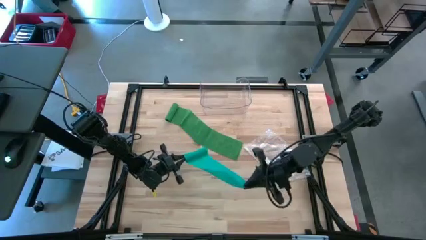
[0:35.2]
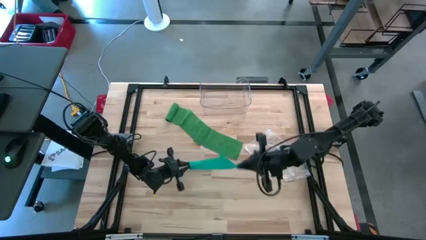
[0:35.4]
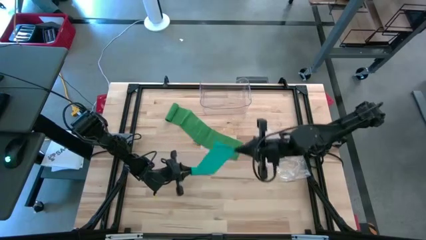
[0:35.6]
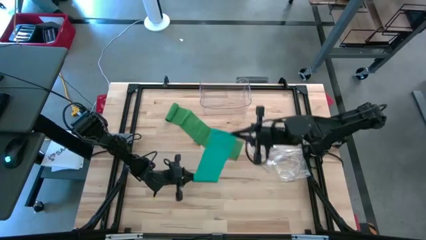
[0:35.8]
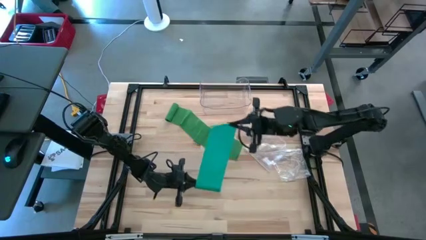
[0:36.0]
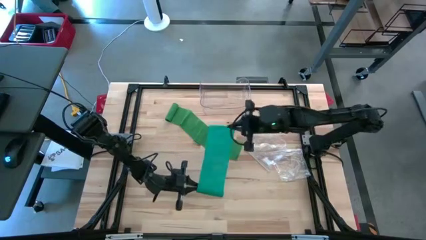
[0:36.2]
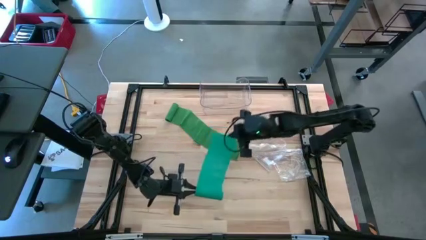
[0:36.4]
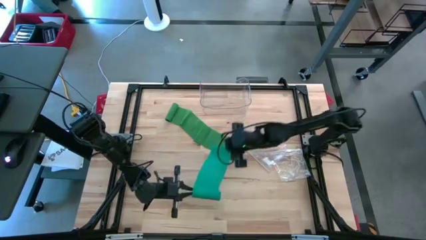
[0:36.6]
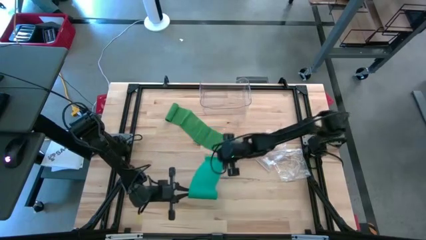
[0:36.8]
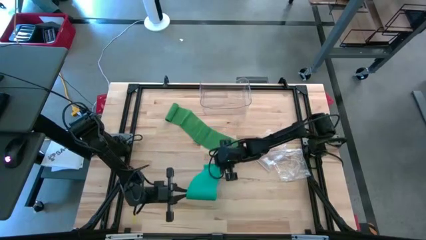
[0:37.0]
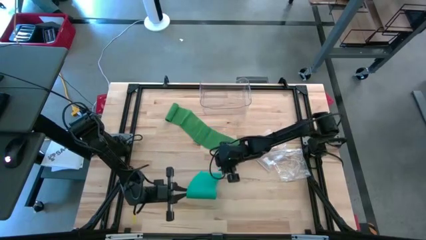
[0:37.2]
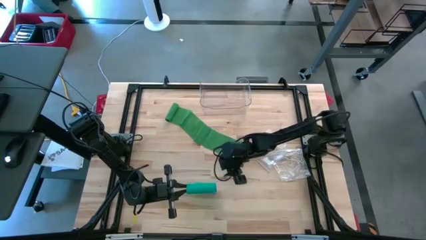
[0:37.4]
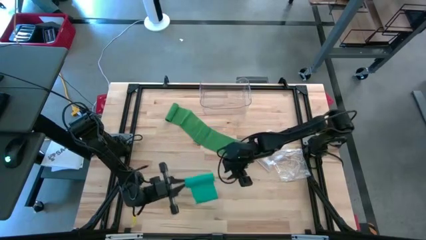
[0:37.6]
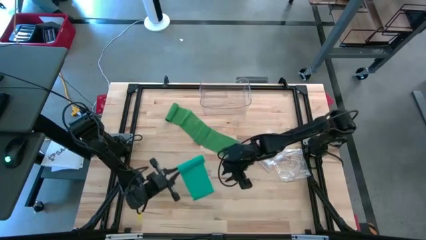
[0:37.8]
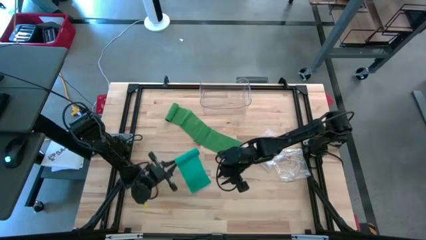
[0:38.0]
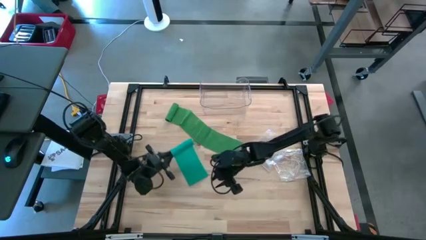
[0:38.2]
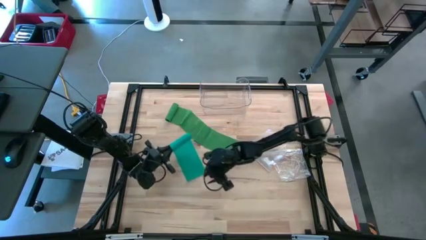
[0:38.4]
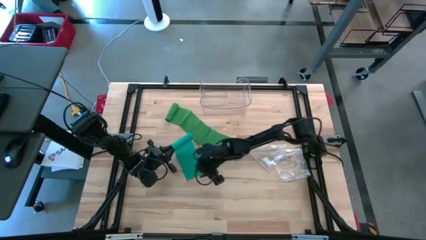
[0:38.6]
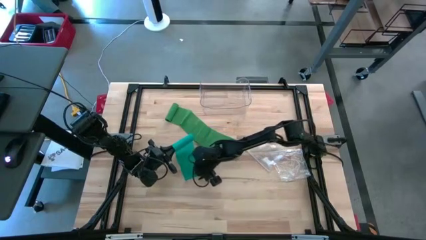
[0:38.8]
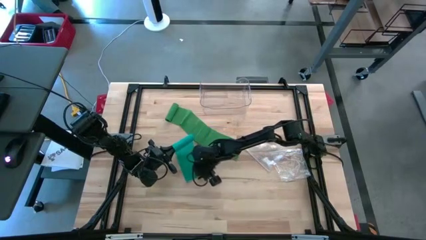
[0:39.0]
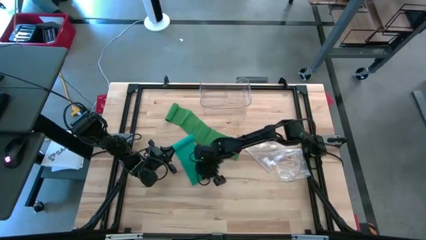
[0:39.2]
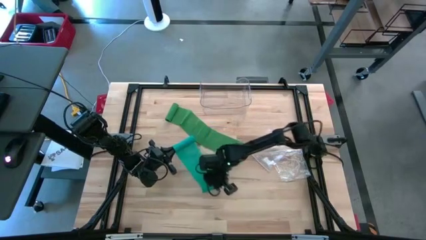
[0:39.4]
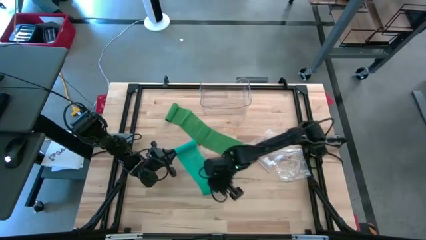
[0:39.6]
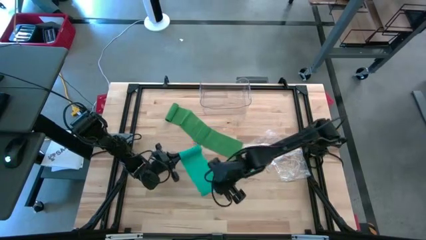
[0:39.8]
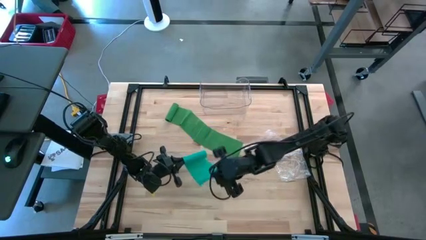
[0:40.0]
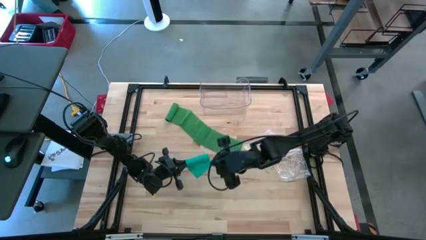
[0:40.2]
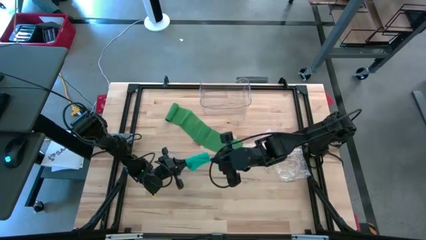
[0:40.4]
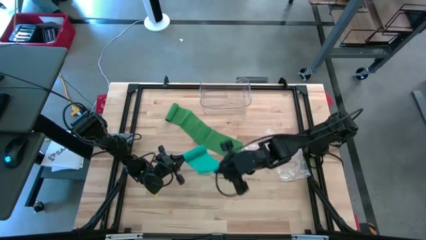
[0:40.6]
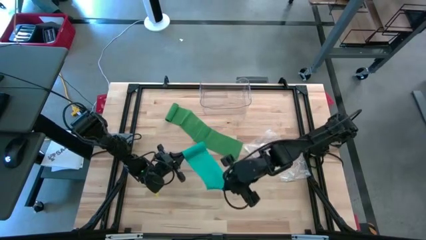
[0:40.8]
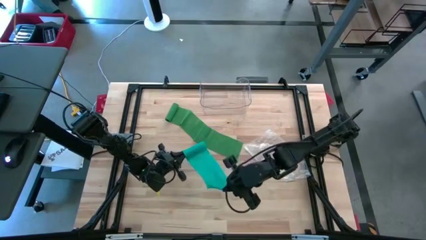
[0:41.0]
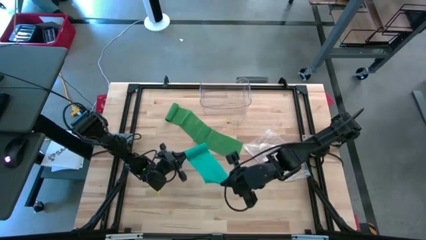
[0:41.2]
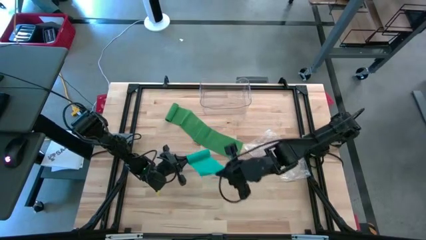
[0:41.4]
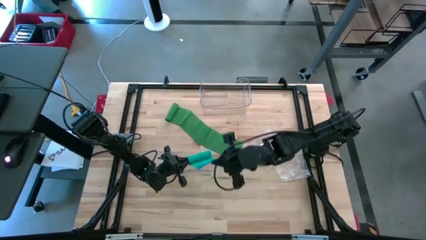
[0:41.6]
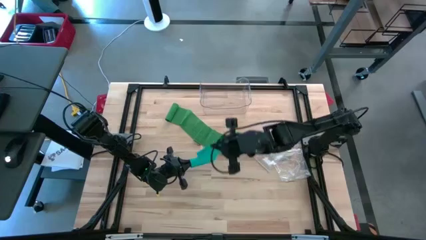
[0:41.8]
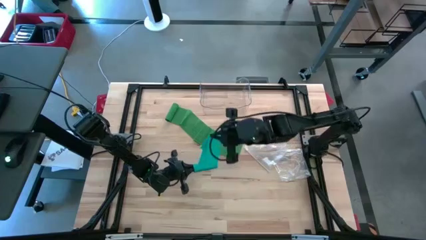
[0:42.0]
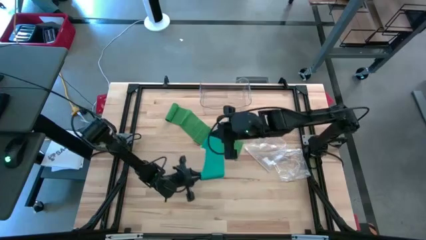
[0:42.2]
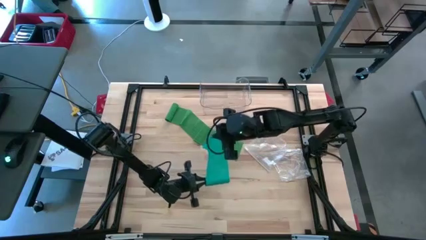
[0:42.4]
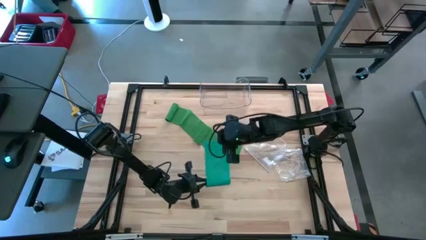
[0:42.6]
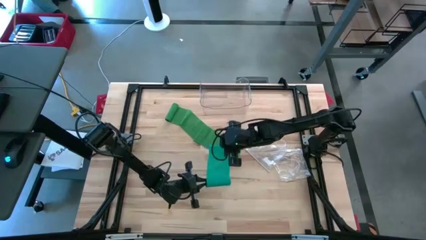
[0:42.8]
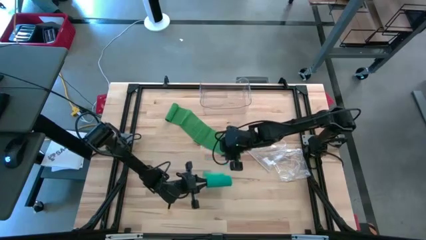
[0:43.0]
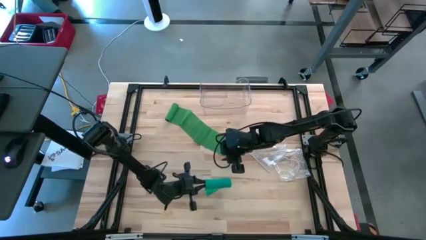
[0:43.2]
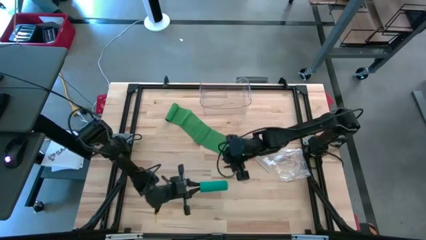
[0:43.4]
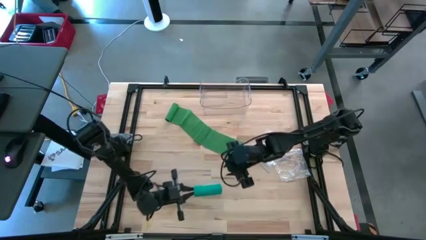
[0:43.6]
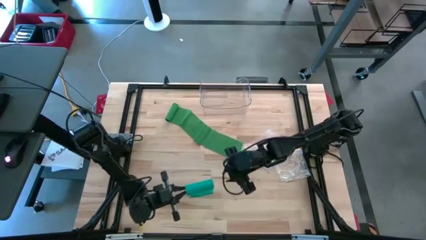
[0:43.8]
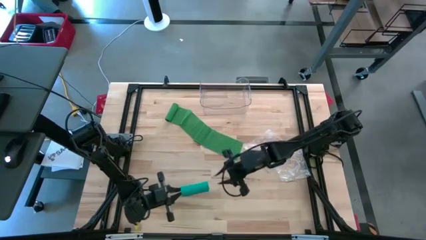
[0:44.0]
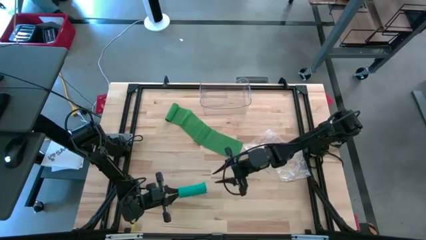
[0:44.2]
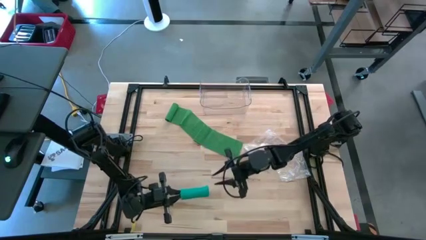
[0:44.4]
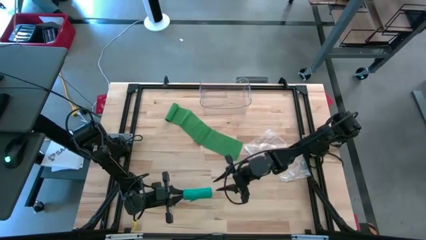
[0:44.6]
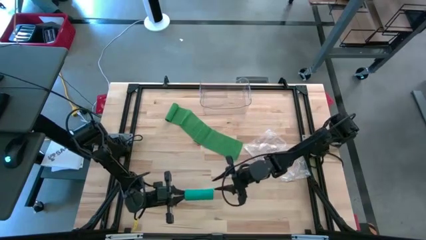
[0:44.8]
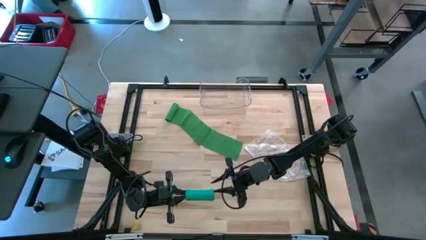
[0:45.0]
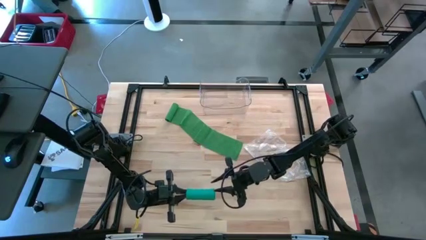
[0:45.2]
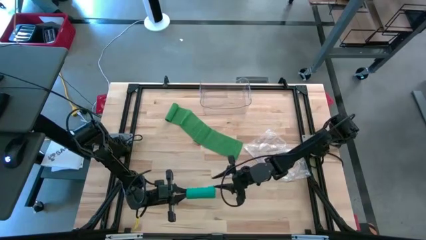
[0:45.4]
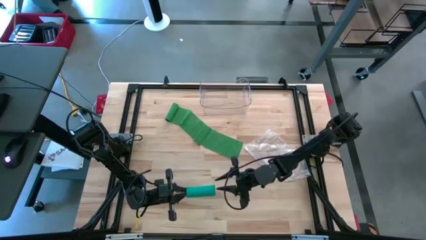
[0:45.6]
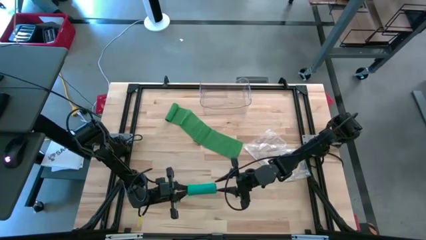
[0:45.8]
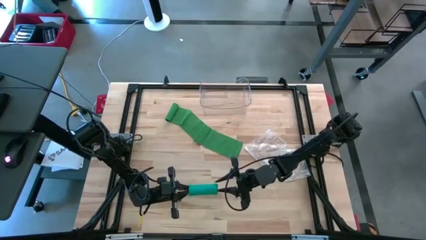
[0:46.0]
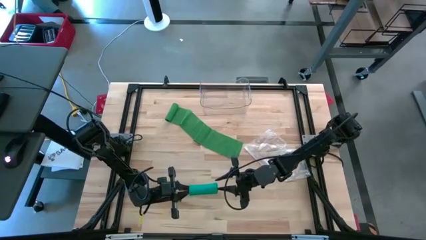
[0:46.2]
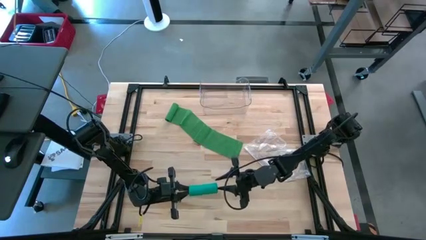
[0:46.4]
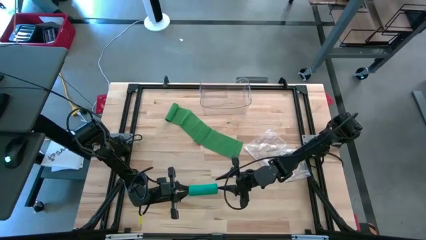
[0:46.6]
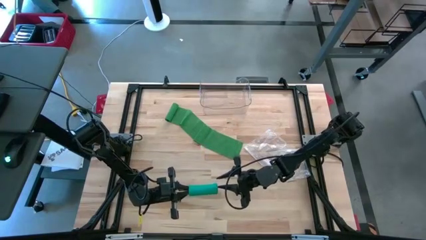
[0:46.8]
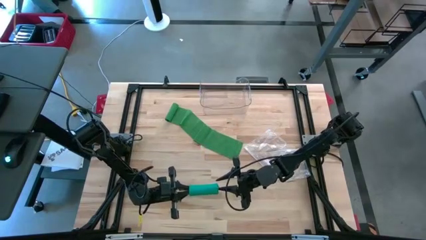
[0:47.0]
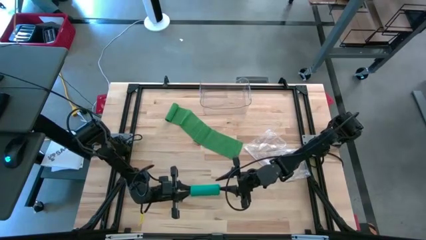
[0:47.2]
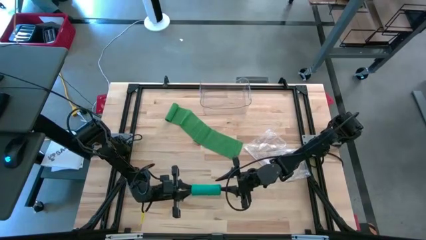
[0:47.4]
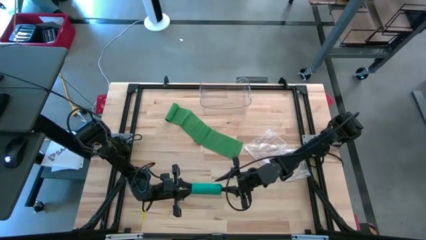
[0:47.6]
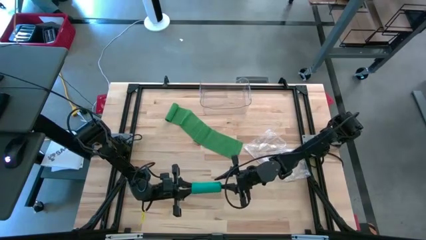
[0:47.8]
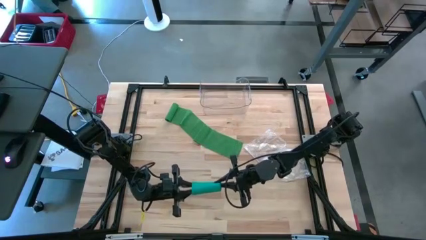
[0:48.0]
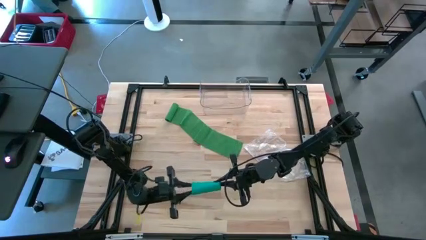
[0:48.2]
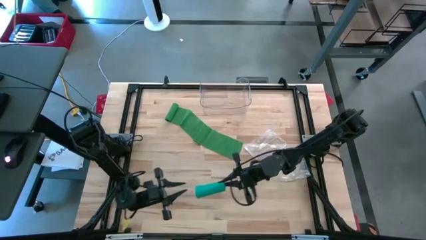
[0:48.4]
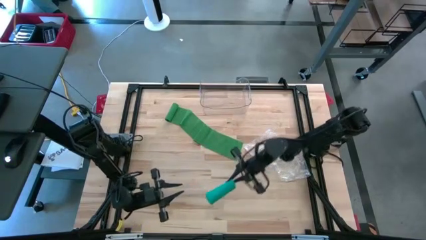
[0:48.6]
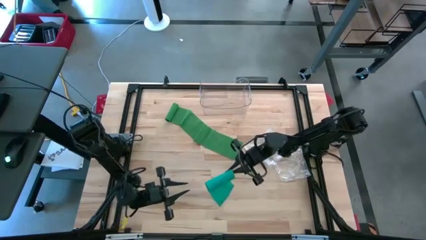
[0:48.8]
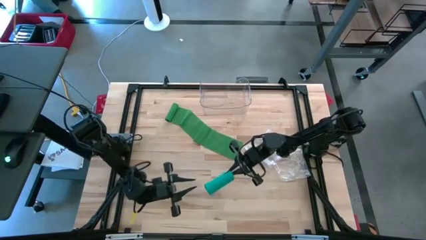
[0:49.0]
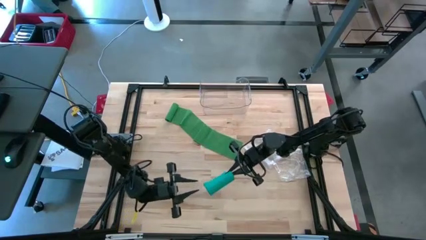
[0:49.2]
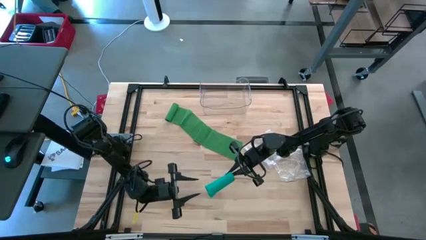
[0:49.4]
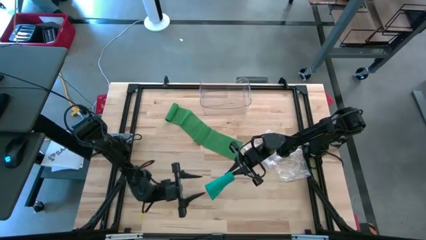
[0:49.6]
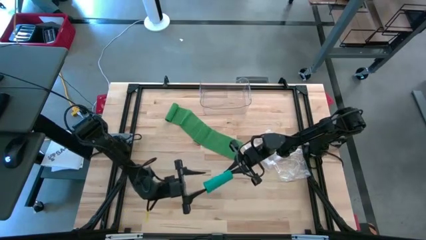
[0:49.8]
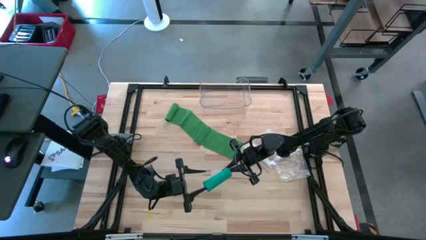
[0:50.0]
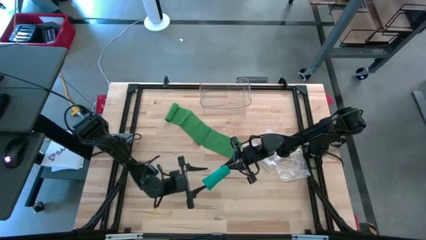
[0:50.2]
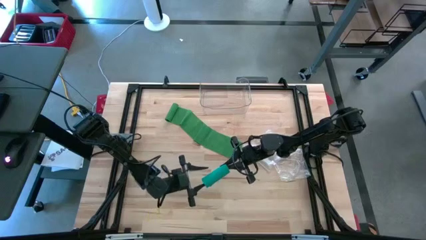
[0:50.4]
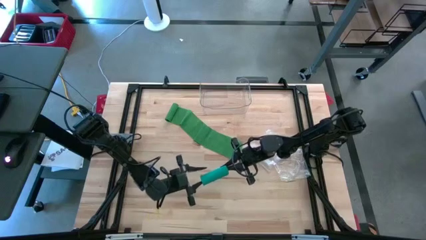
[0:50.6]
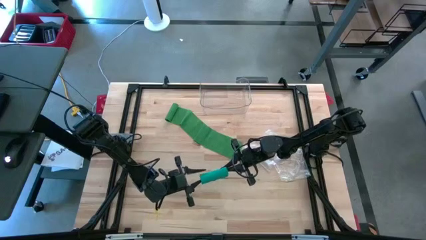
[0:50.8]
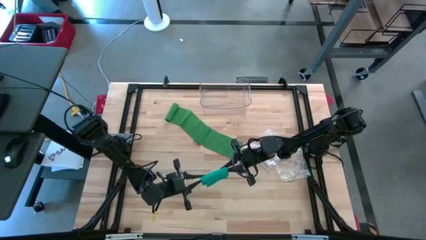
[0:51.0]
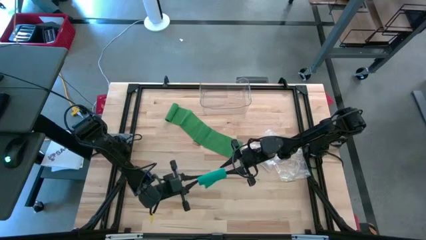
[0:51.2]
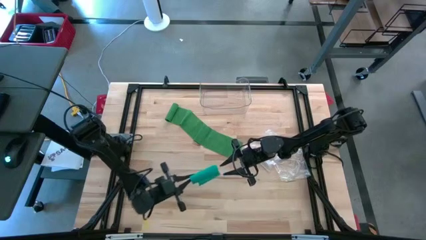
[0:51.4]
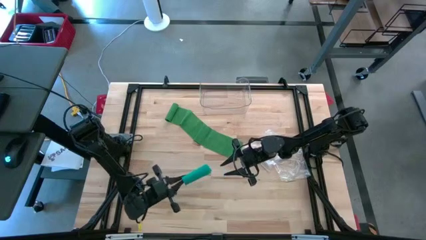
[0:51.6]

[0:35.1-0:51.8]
Task: Roll bandage
Roll the blue bandage
